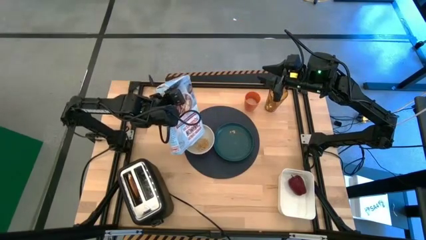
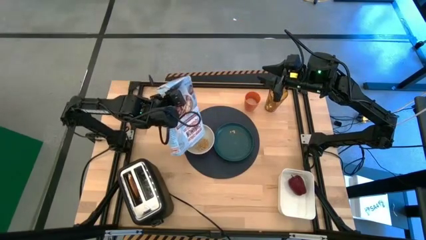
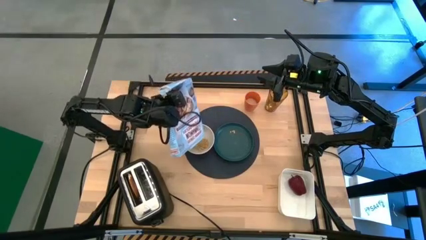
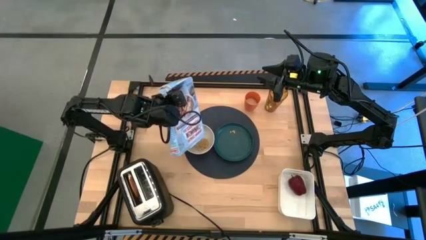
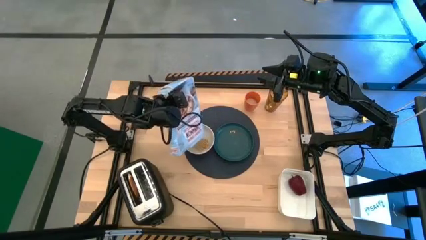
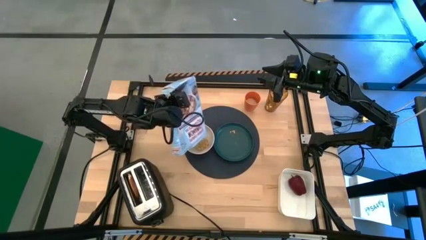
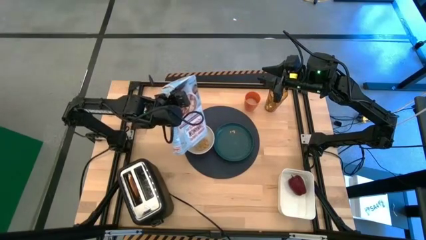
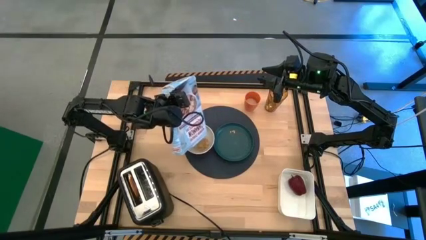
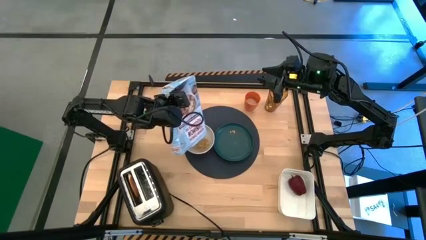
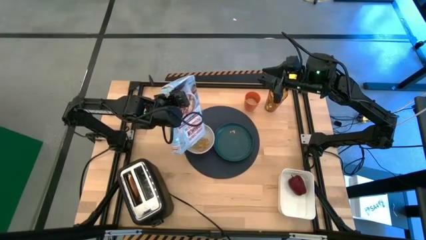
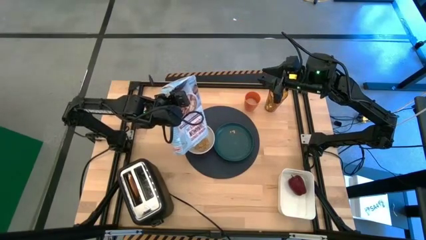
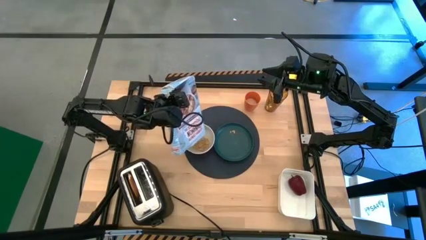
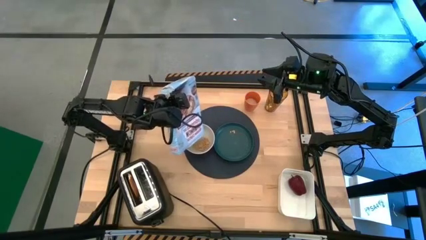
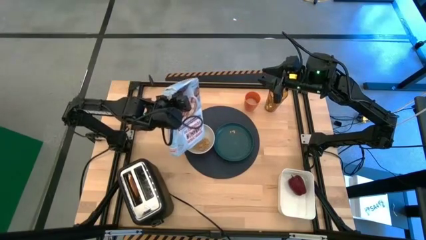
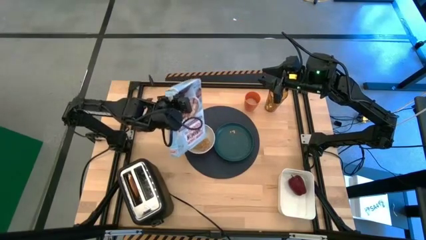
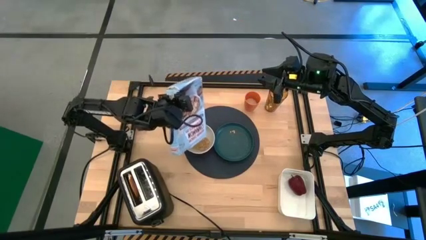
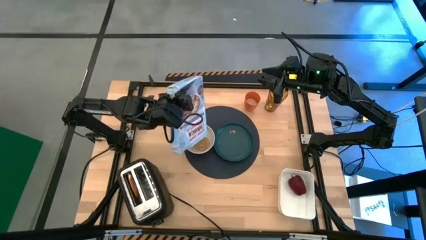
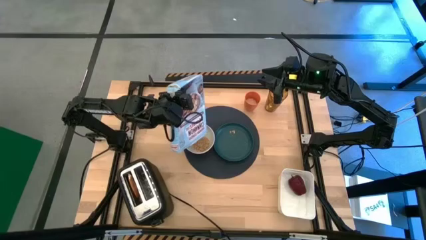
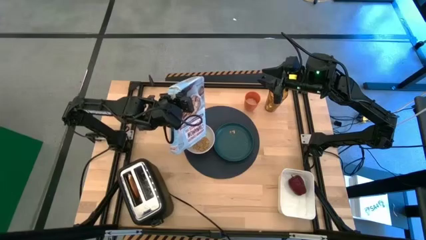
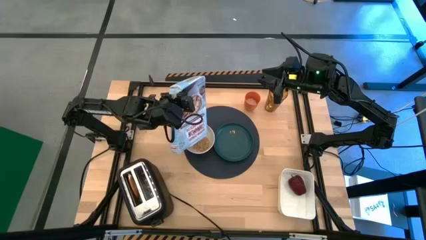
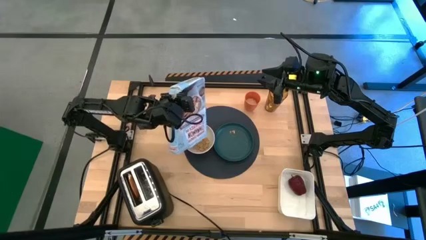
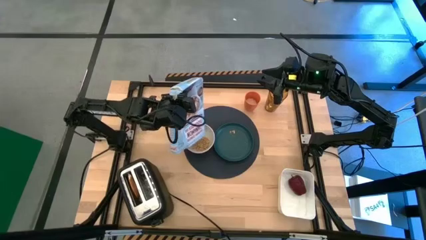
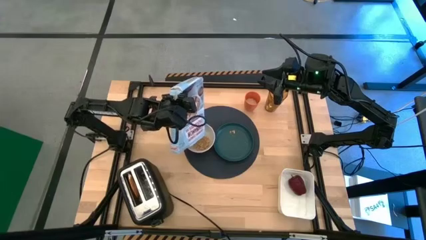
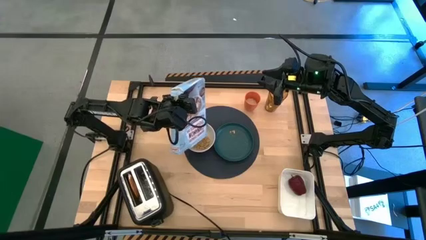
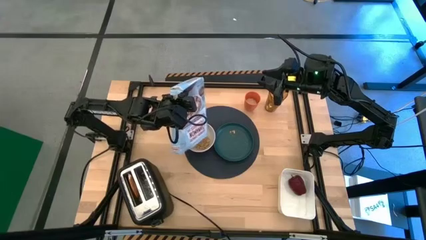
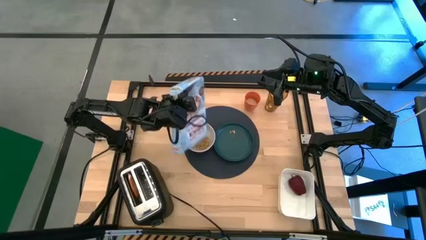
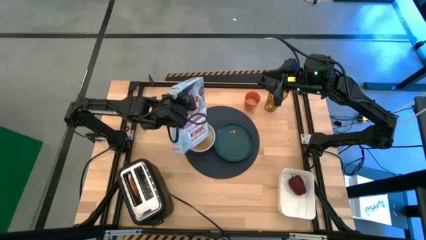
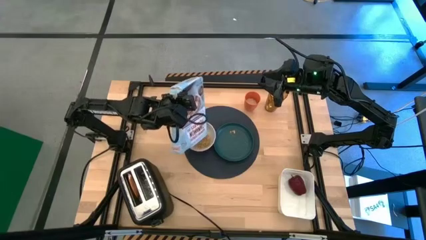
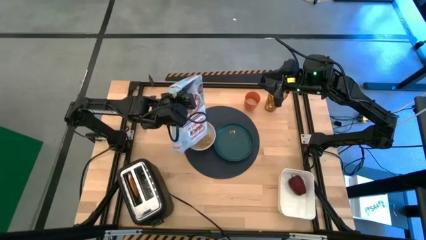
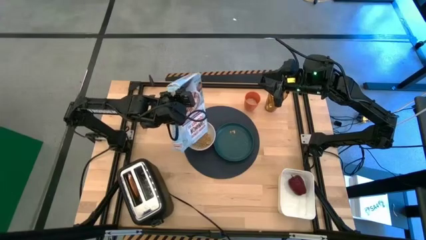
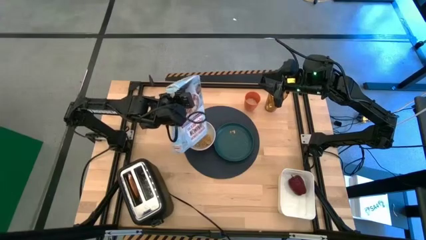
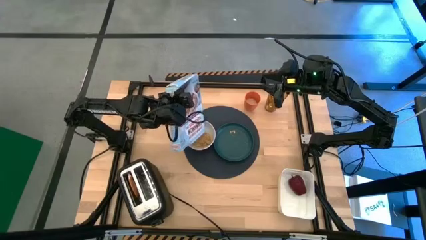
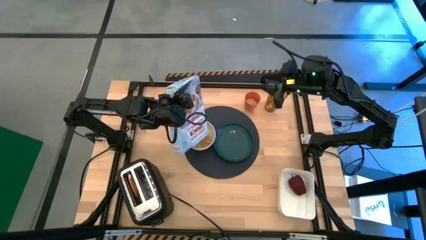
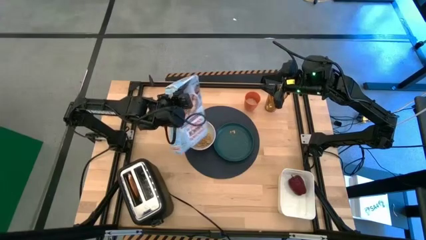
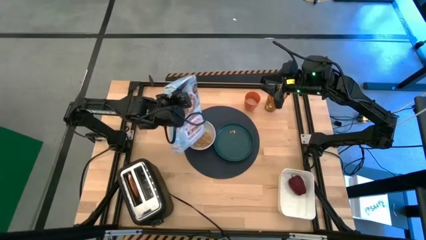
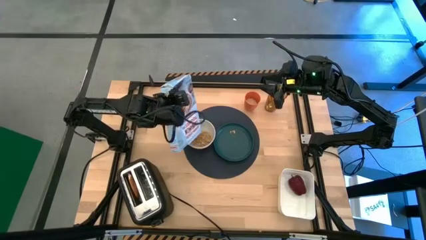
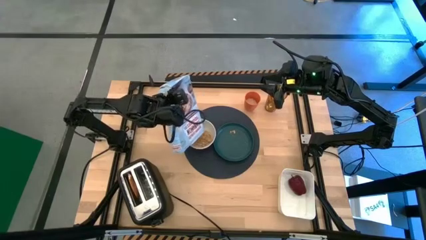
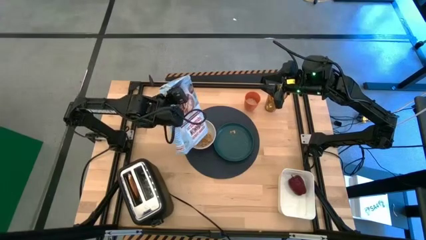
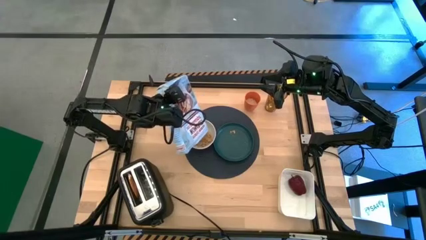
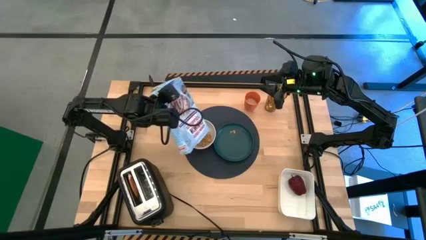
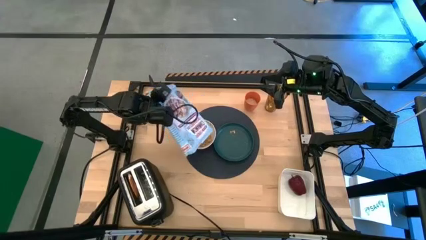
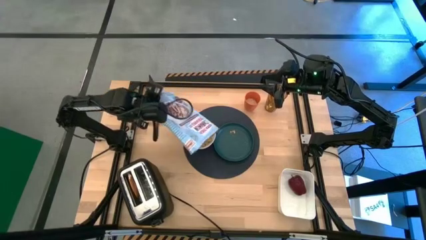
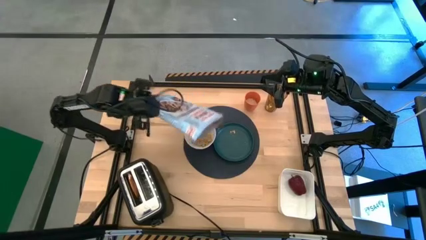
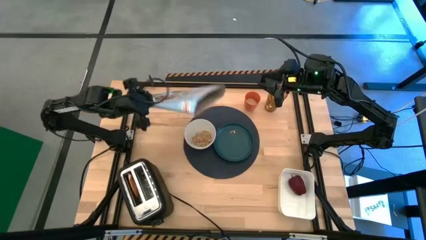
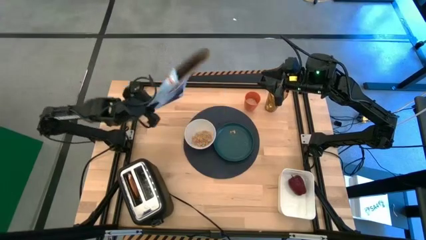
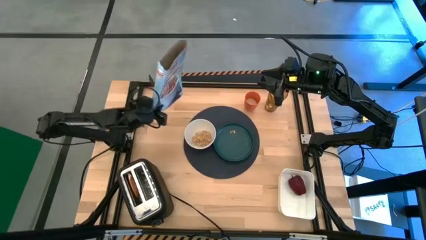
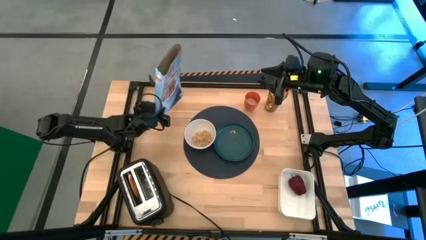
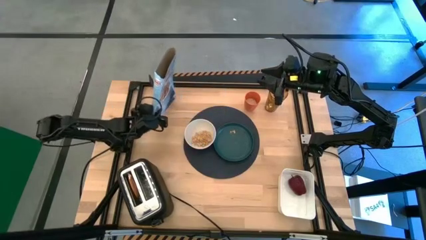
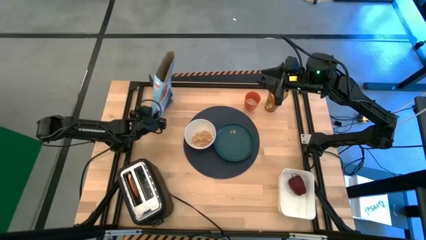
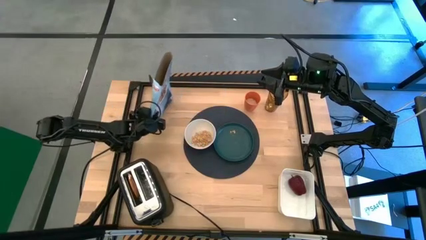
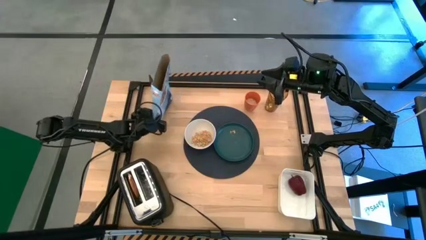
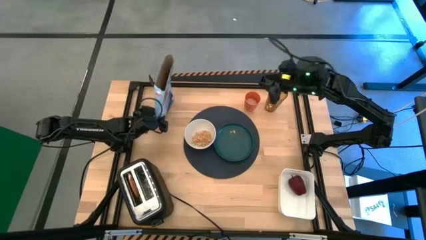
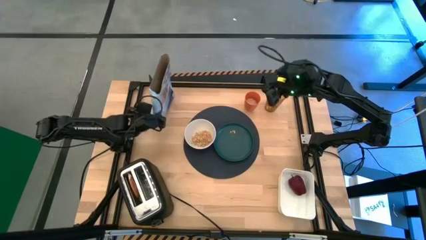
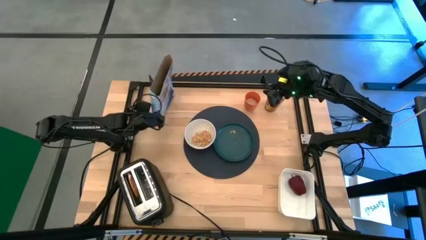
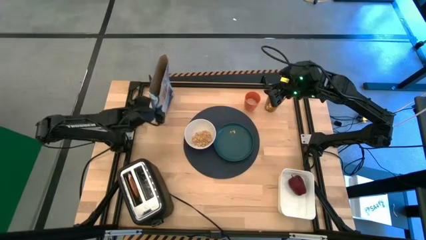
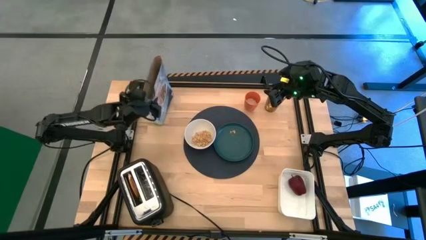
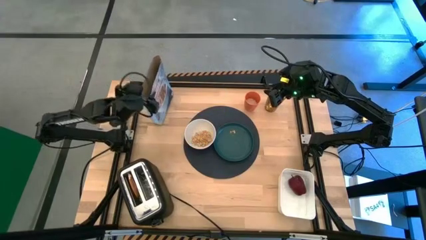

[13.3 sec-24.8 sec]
Task: Arrange a breakfast setting
Pour the cereals from the blue cereal box into the white bowl on the blue table mat

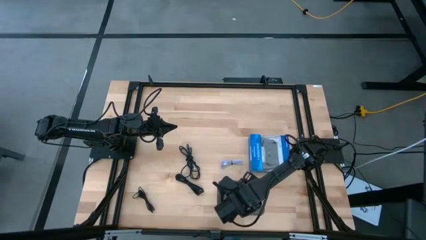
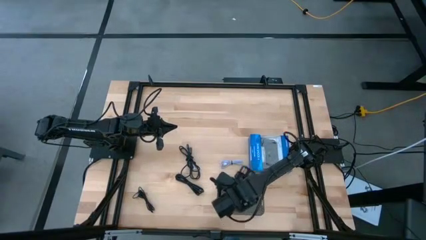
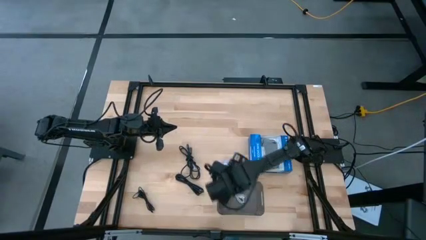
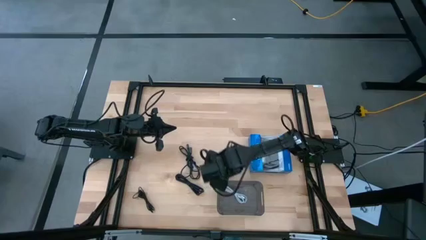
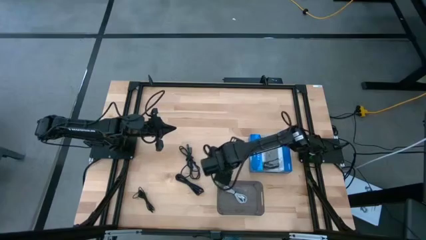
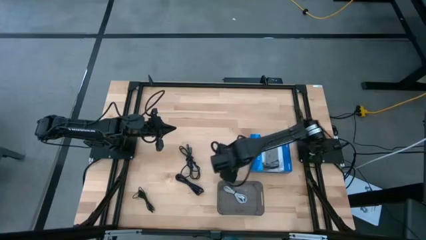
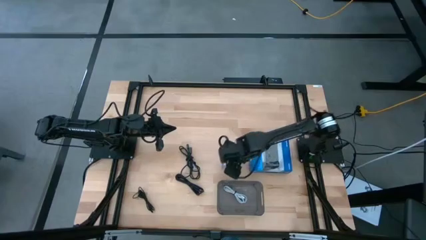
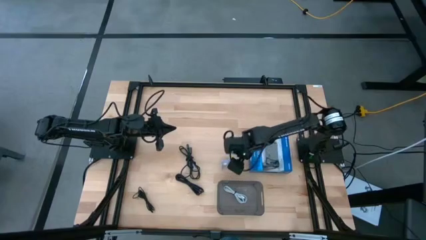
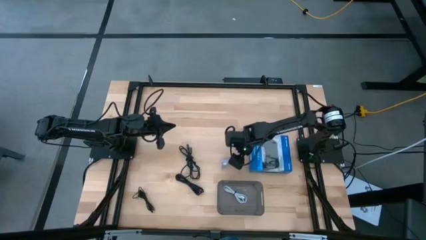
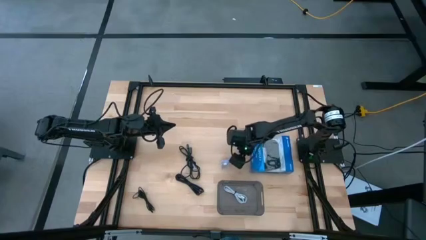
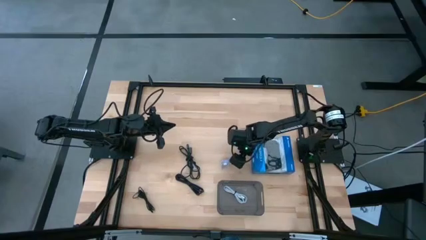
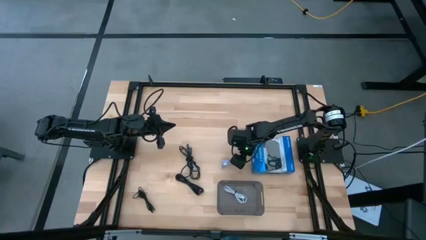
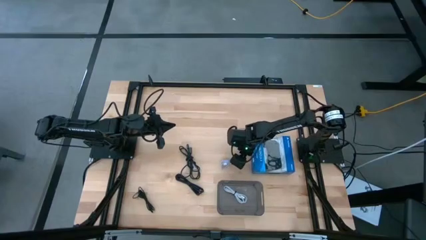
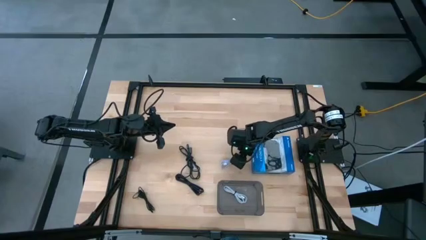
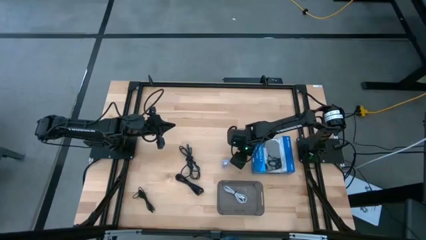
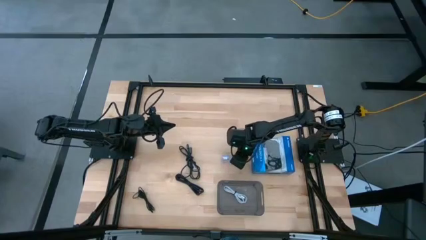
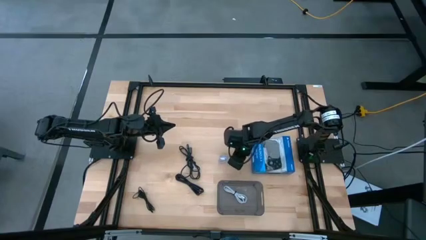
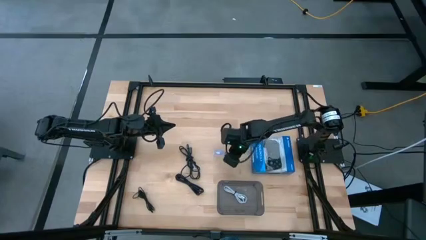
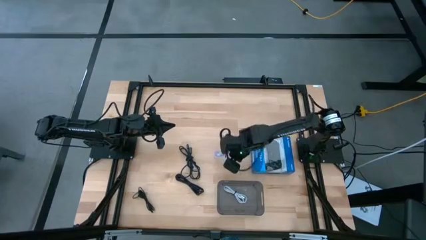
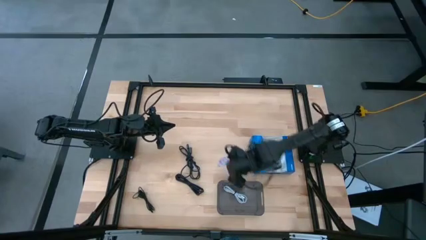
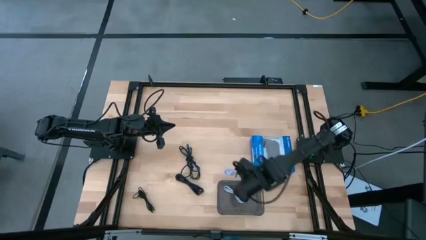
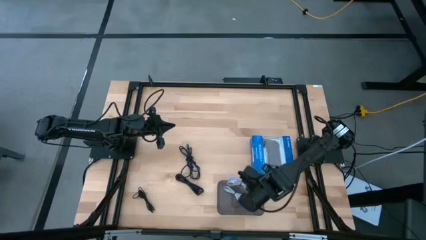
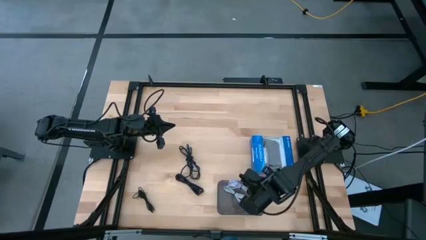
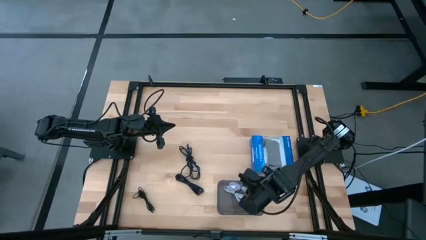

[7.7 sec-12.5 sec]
Task: Pick and place USB-C Cables
Put the purple charger cable into the black bin
